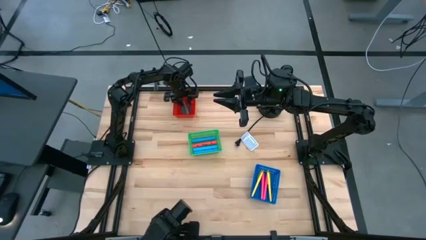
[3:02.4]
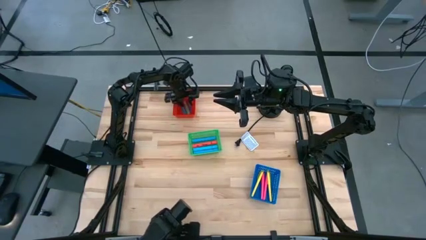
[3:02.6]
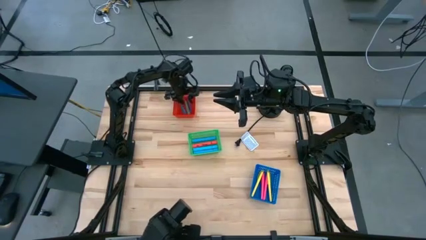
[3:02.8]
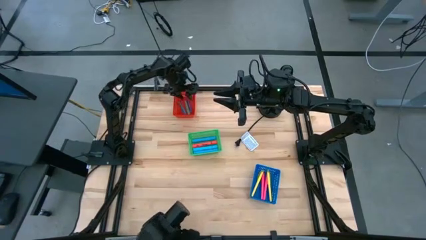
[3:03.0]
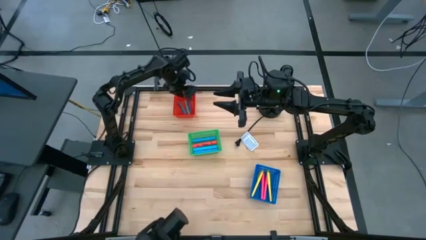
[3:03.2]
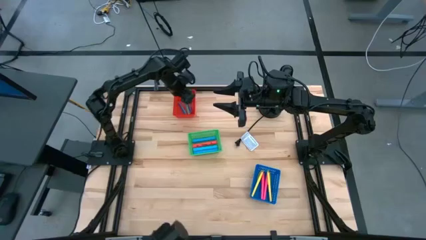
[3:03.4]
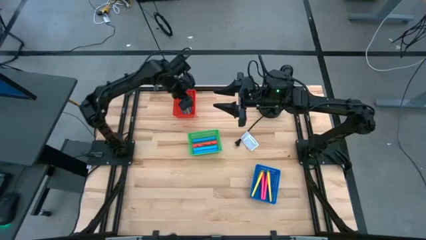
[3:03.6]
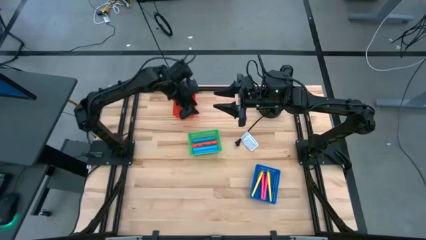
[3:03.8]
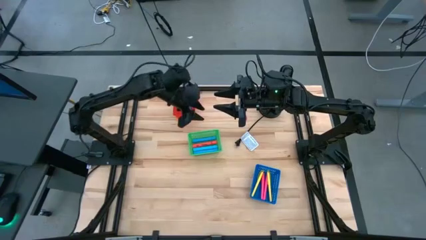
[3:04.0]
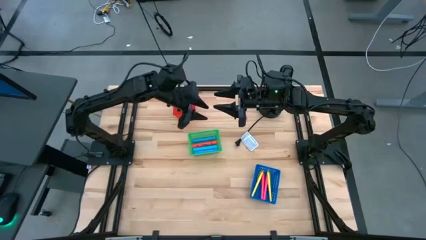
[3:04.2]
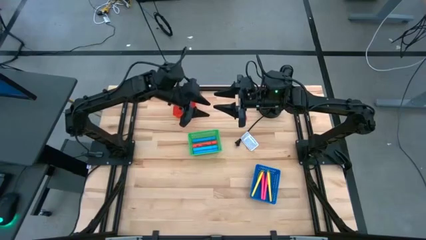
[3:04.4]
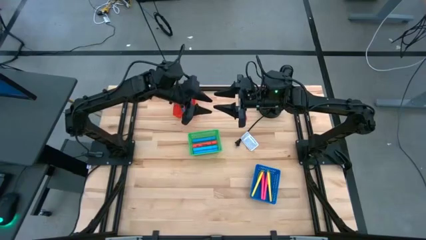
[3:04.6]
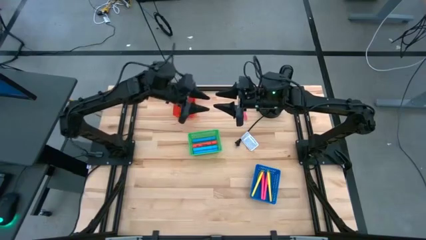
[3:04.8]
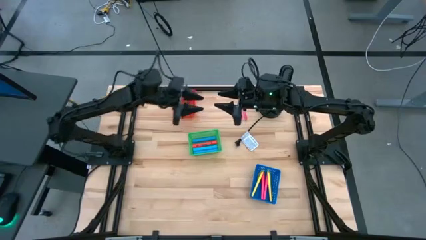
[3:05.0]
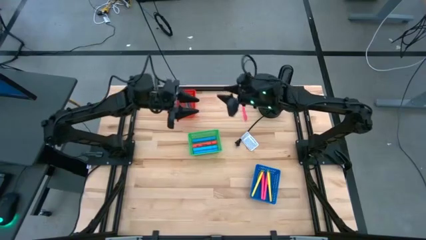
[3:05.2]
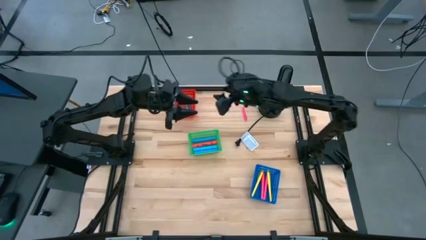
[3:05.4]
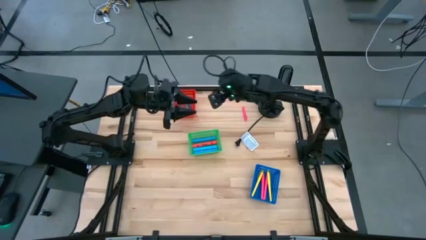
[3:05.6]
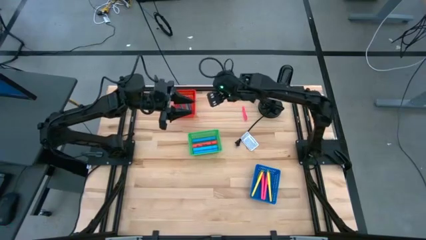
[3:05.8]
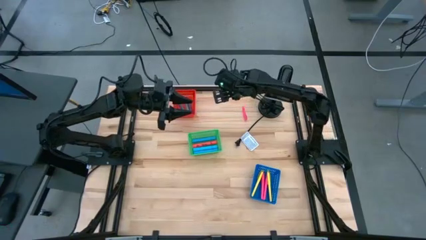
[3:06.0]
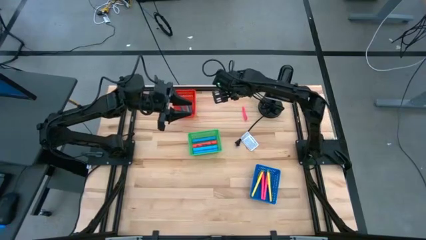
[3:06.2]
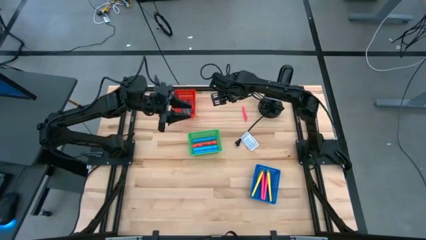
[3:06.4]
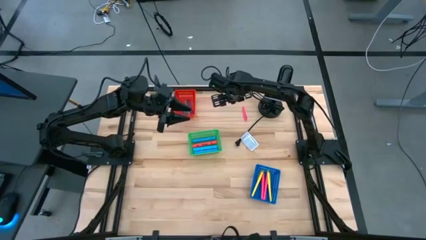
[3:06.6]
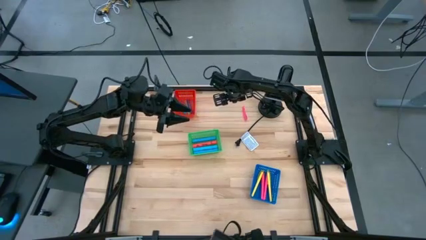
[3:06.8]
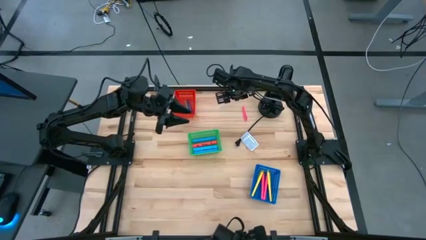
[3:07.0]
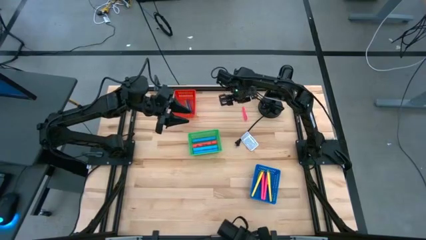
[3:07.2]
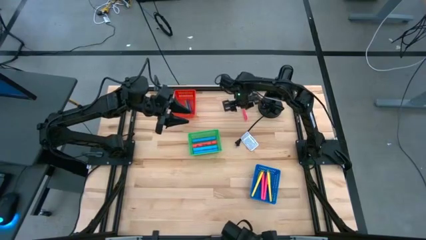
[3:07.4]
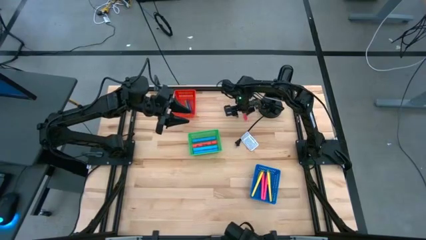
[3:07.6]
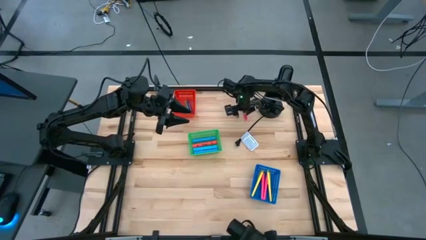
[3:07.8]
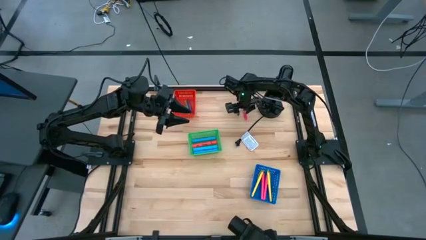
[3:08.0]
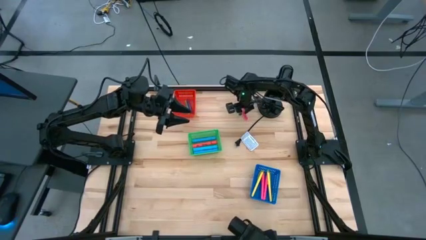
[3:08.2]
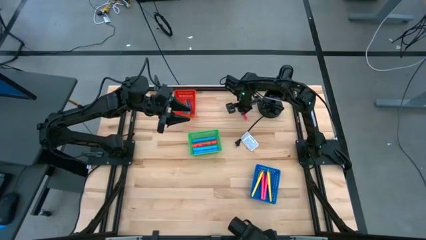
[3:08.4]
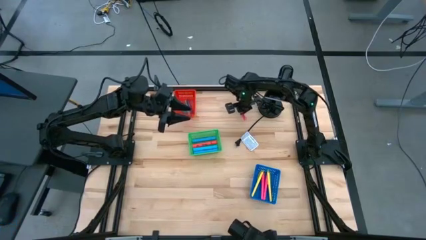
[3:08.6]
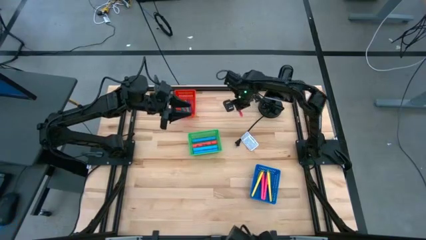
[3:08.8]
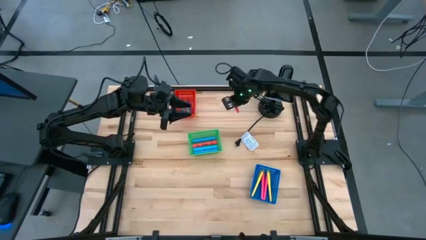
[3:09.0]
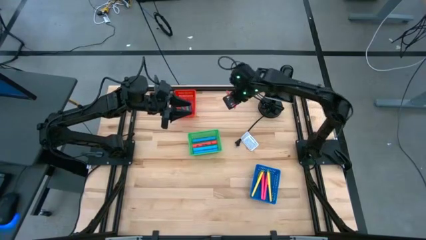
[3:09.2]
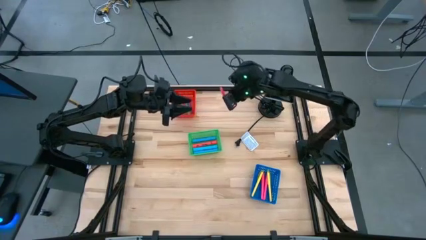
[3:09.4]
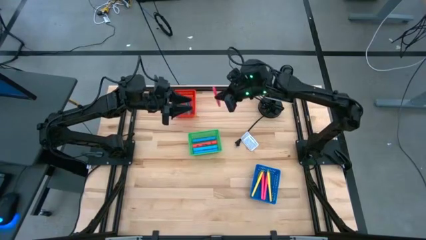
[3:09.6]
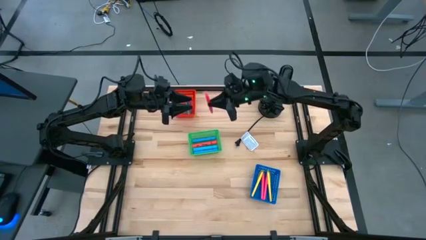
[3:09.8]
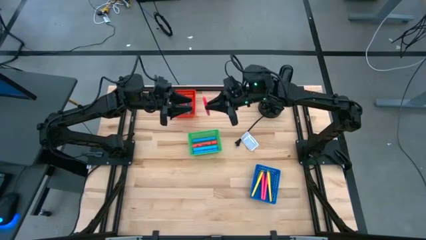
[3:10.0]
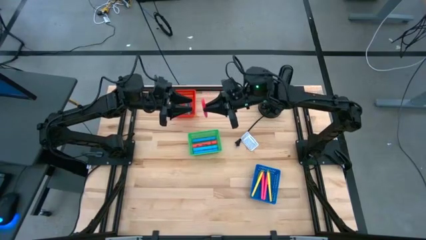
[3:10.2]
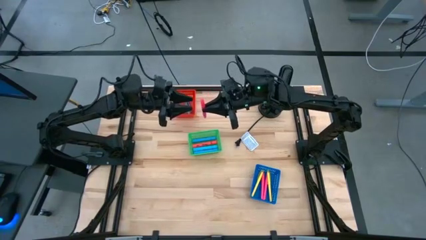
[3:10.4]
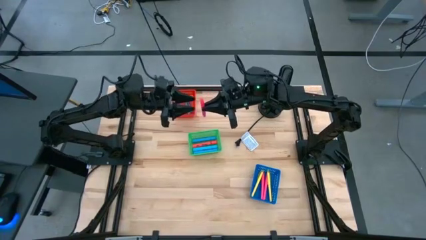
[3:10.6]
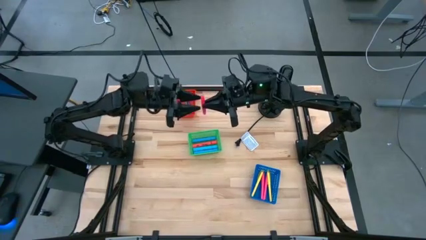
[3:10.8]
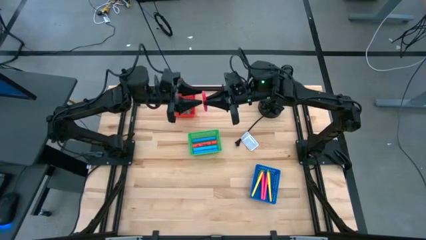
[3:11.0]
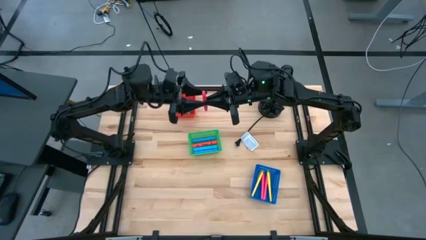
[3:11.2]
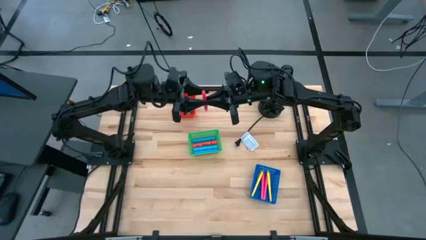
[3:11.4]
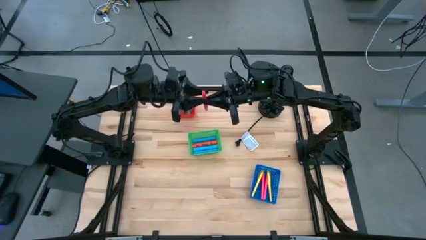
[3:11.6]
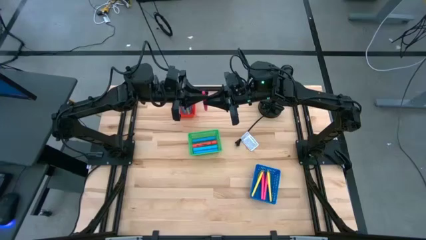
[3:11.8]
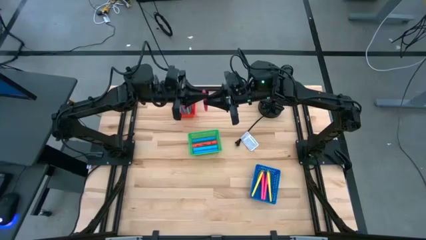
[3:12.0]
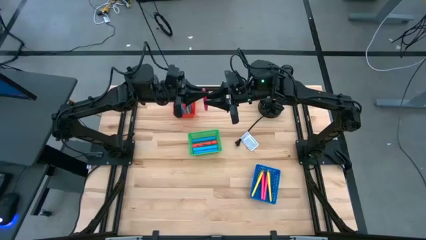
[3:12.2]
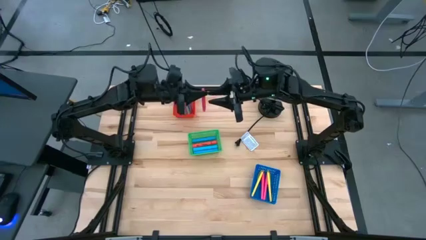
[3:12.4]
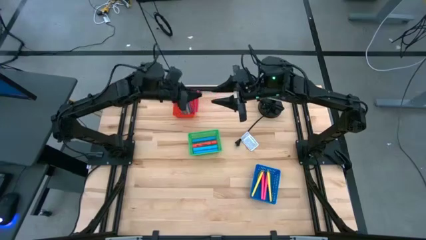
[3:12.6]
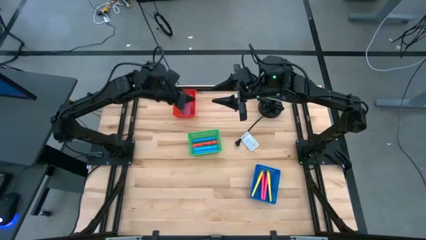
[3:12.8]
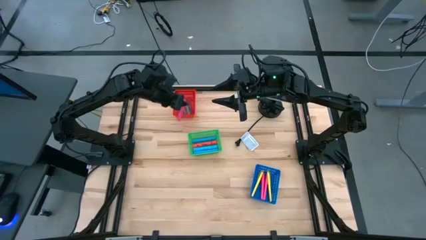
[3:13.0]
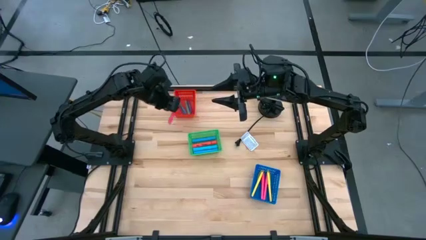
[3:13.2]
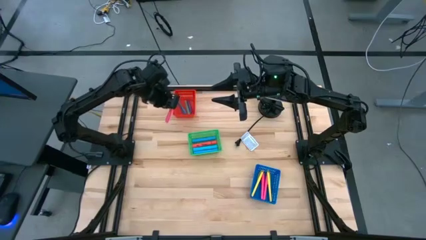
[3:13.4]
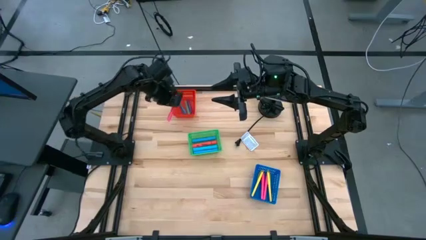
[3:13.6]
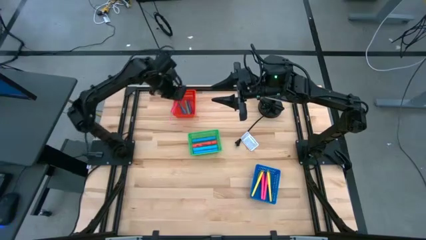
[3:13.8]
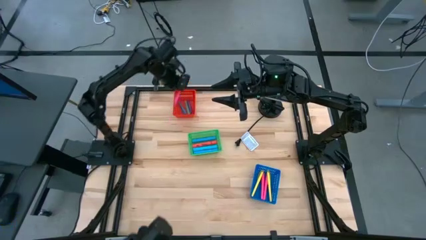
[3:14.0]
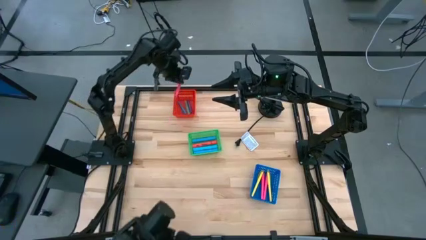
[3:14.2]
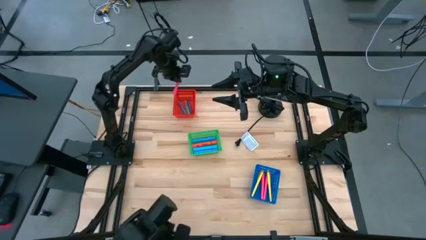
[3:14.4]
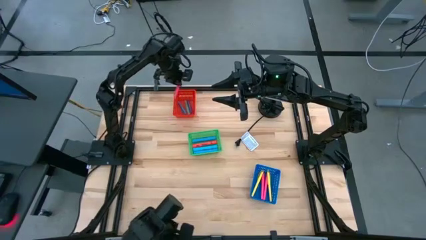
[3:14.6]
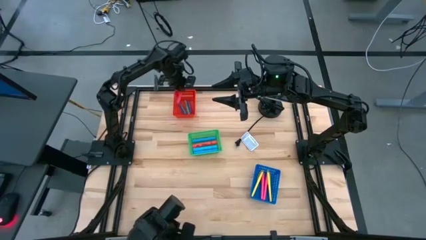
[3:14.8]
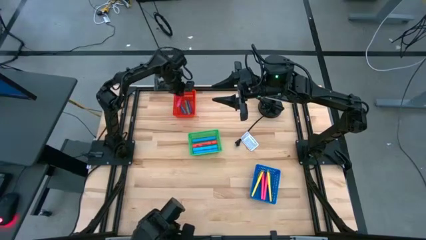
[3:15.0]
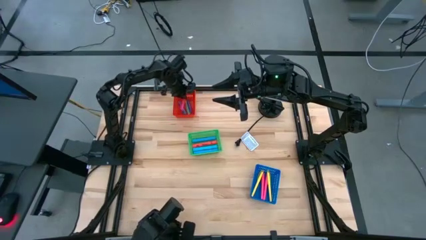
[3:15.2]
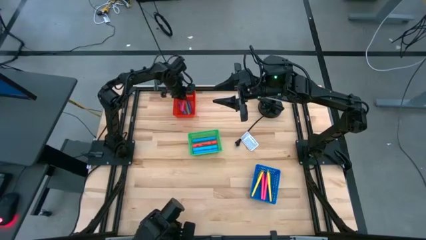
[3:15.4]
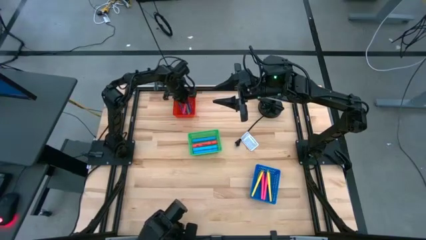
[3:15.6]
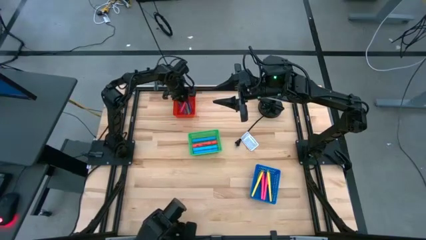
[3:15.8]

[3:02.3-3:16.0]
Task: Pick & Place Markers
Put the small pink pen into the red bin

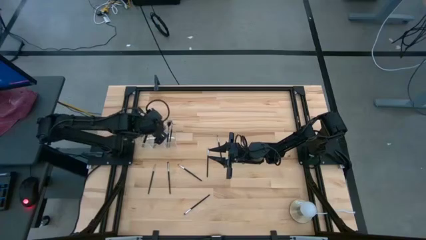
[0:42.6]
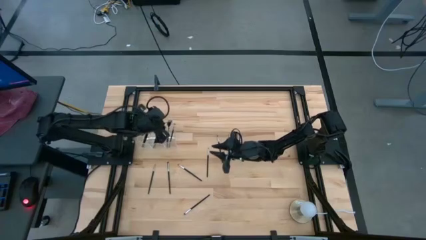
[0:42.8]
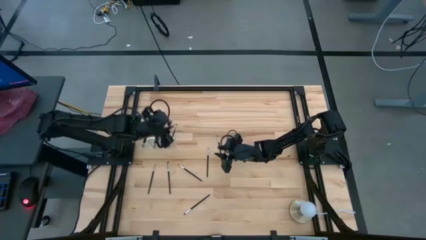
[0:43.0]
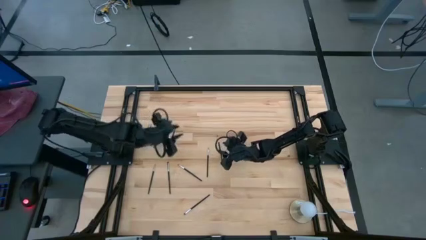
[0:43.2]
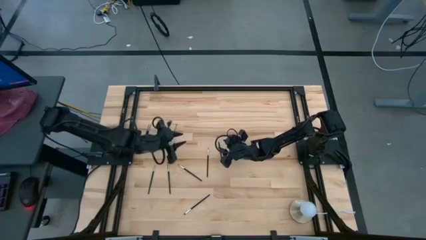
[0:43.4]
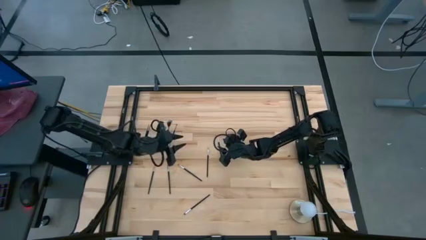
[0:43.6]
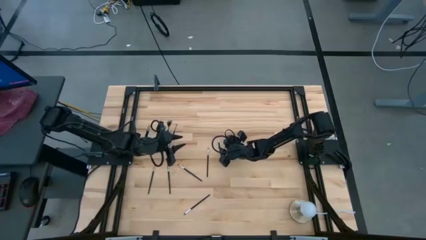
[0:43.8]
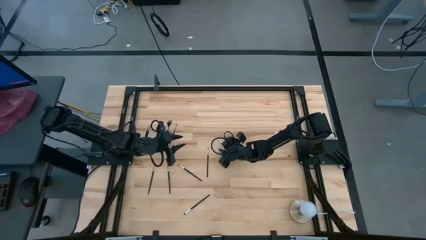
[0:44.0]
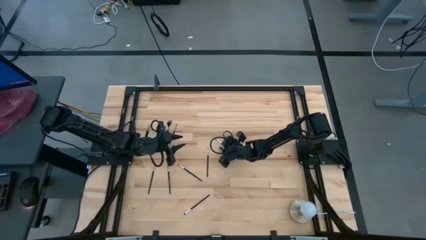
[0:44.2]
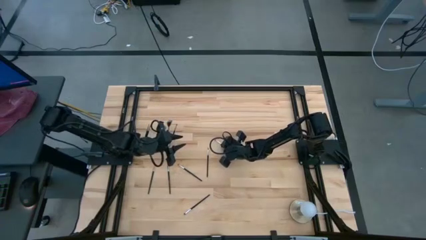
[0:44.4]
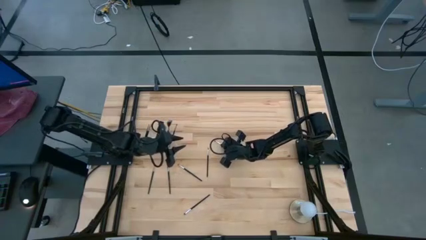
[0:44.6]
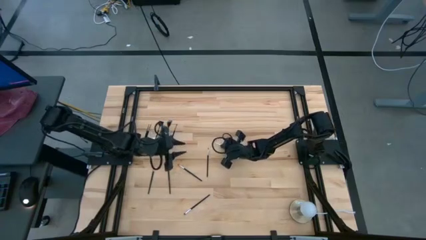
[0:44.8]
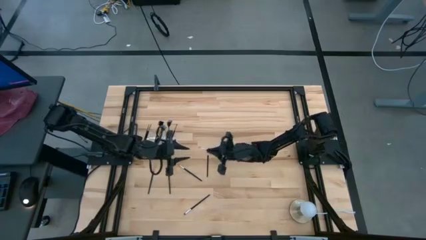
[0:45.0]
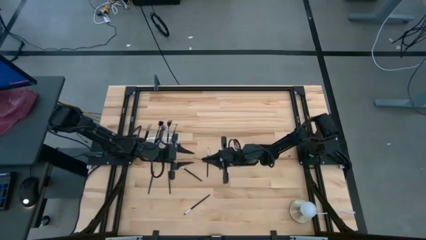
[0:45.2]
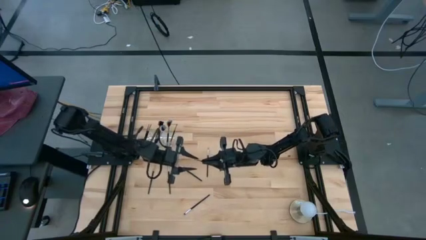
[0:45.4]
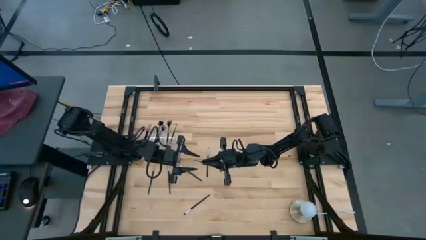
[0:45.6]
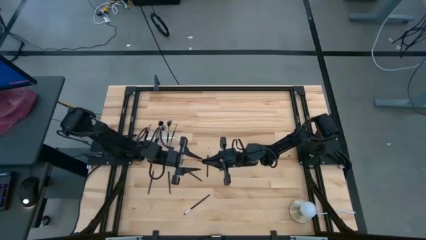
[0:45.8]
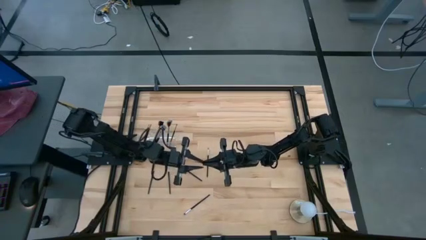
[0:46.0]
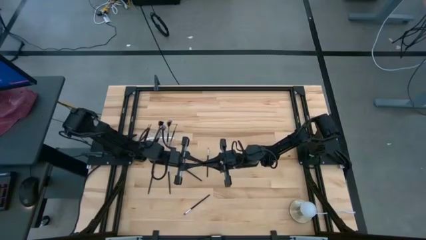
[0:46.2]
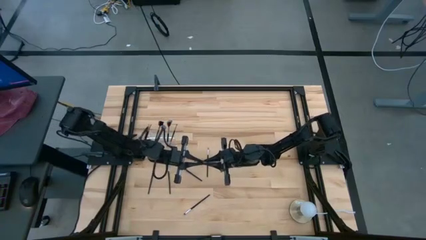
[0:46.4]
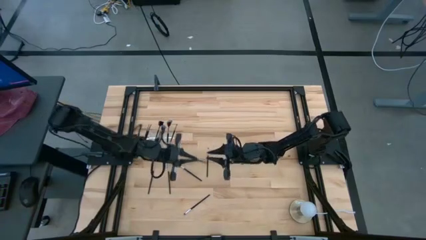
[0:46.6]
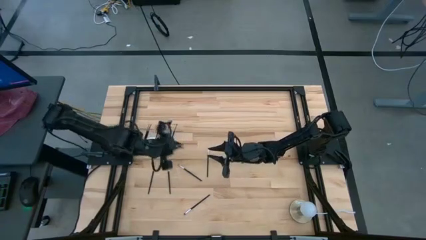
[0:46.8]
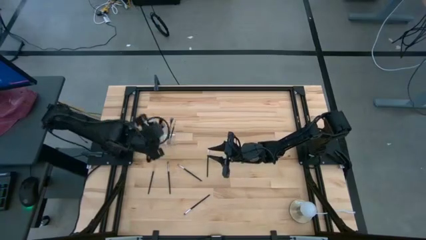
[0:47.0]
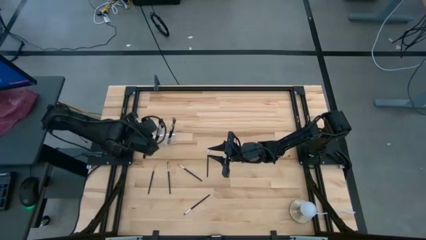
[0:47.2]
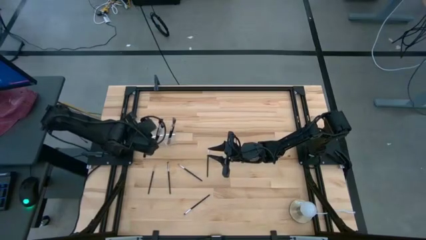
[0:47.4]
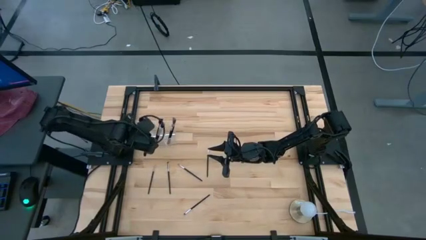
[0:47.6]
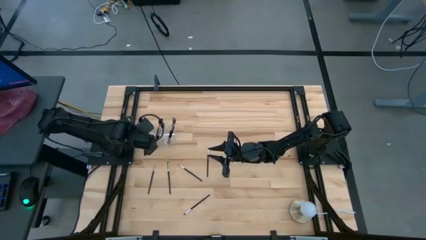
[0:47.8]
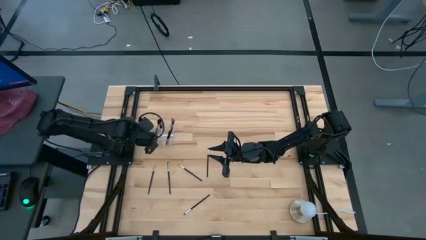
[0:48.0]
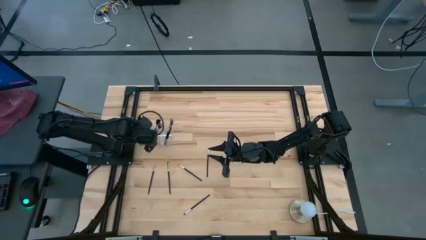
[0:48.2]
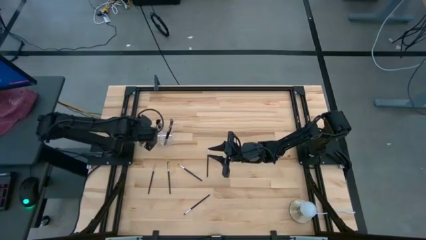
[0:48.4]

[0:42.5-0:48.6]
Task: Put items in baskets/containers
Put the black eyeshadow brush into the transparent organizer
